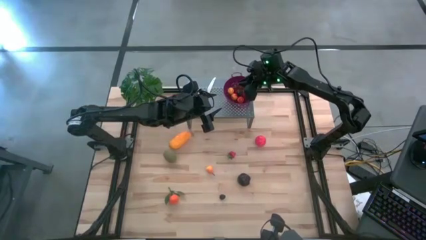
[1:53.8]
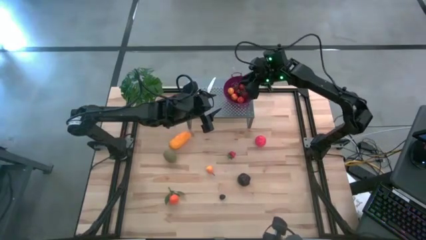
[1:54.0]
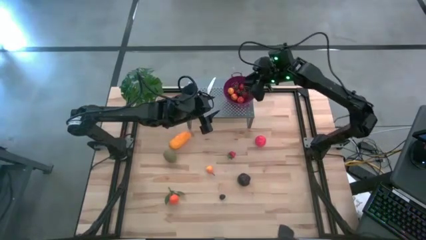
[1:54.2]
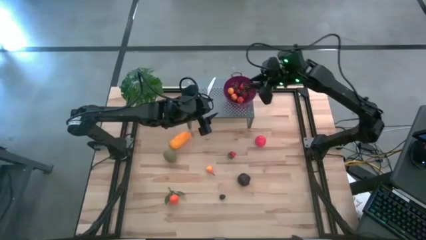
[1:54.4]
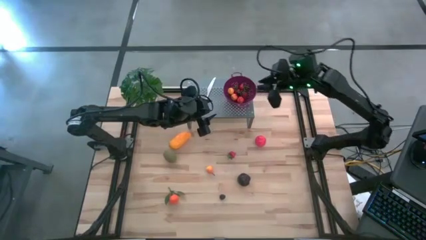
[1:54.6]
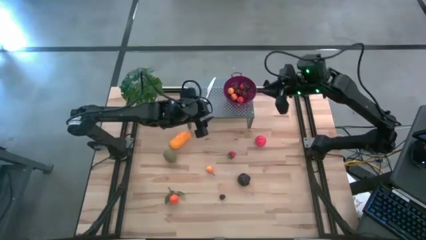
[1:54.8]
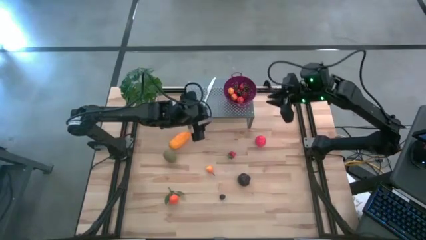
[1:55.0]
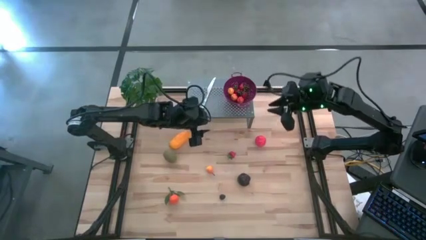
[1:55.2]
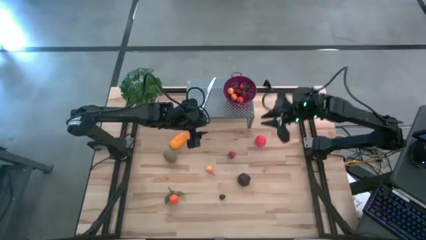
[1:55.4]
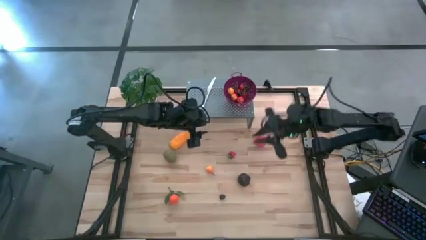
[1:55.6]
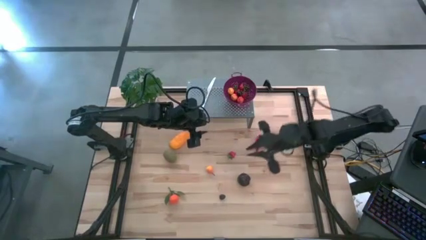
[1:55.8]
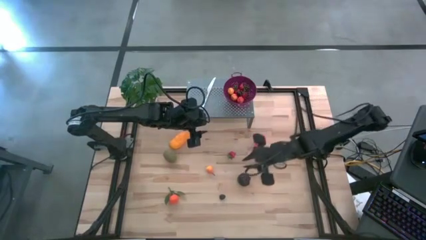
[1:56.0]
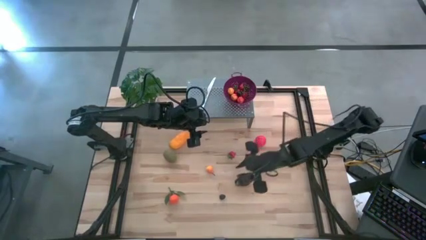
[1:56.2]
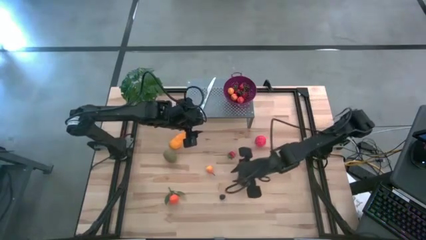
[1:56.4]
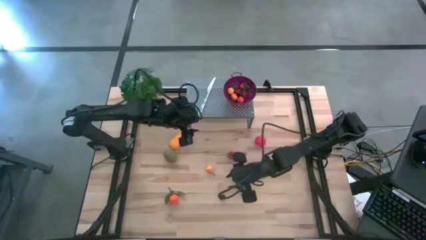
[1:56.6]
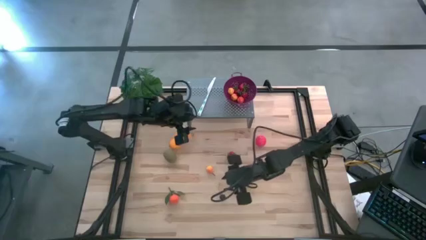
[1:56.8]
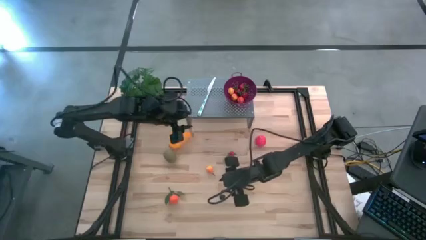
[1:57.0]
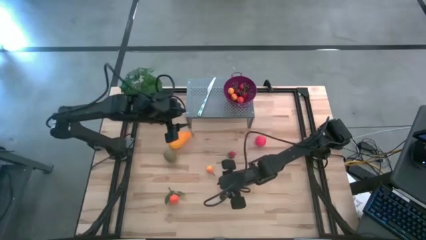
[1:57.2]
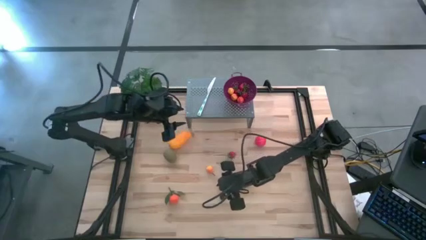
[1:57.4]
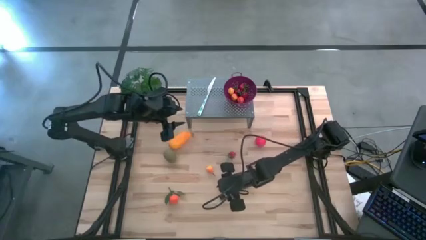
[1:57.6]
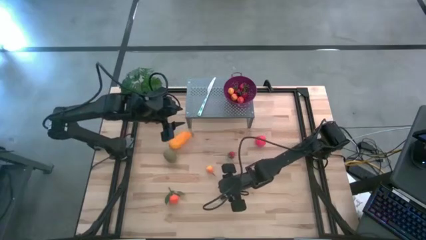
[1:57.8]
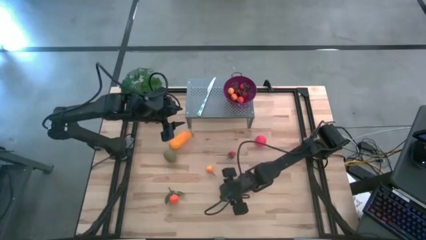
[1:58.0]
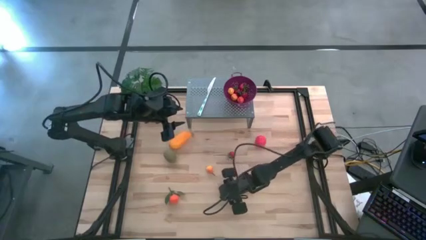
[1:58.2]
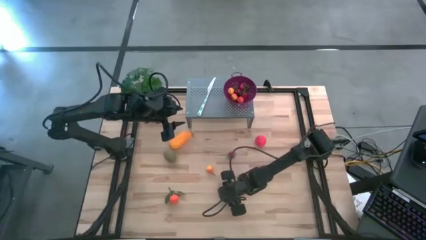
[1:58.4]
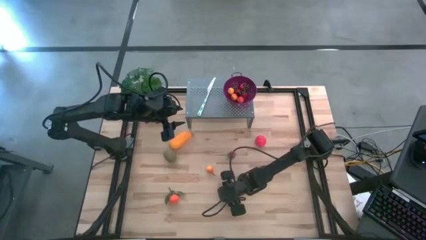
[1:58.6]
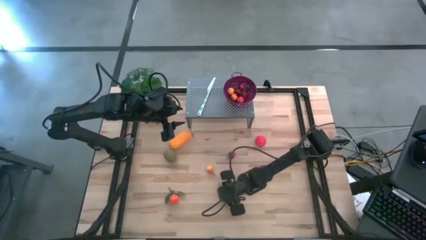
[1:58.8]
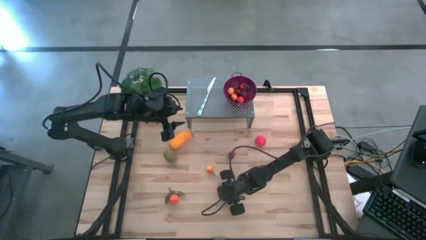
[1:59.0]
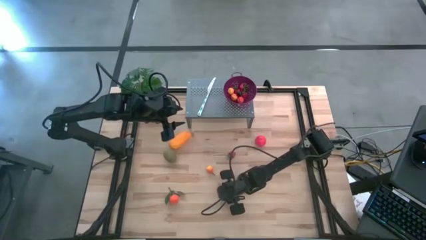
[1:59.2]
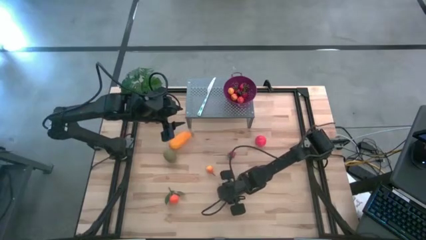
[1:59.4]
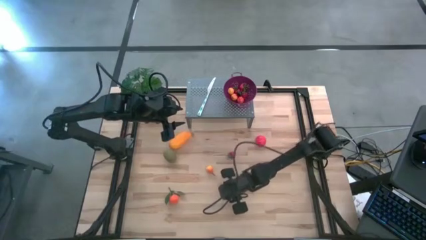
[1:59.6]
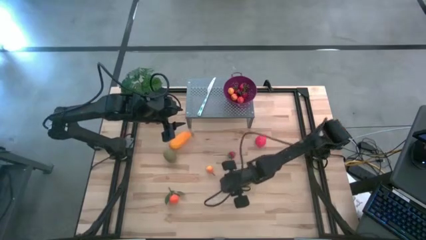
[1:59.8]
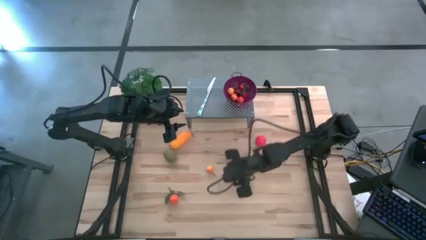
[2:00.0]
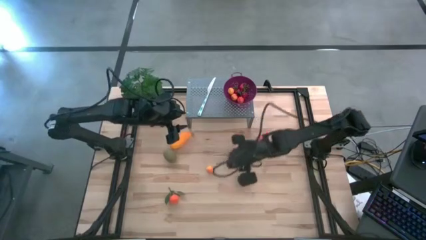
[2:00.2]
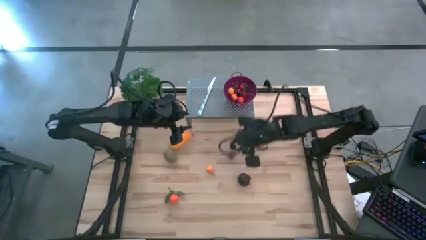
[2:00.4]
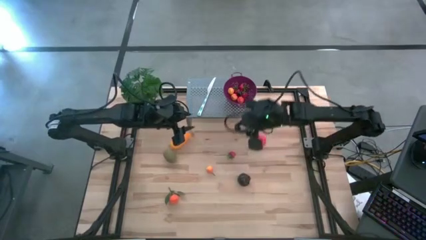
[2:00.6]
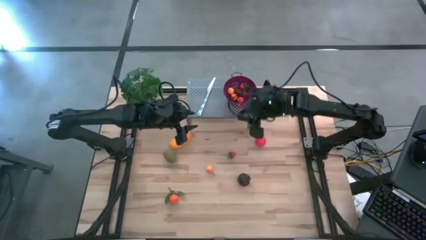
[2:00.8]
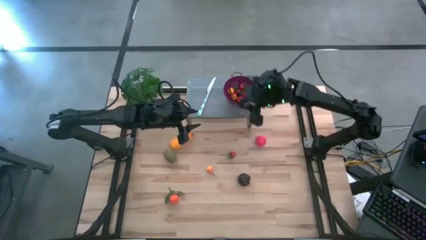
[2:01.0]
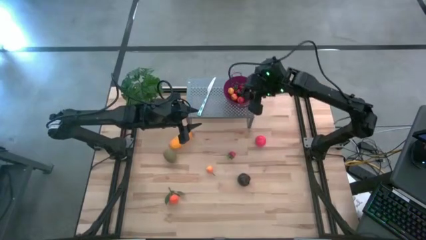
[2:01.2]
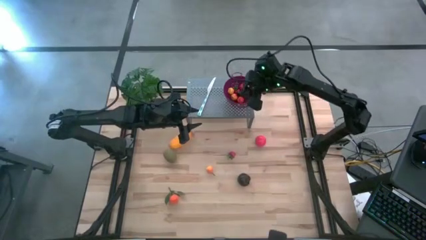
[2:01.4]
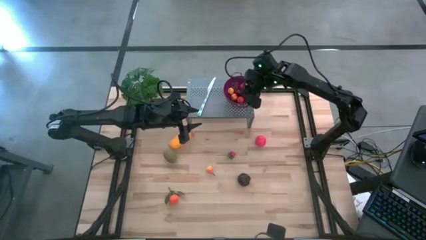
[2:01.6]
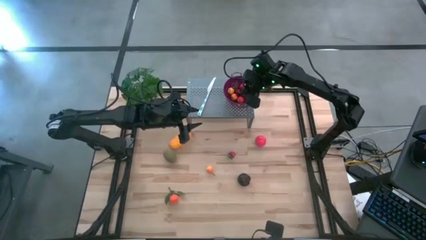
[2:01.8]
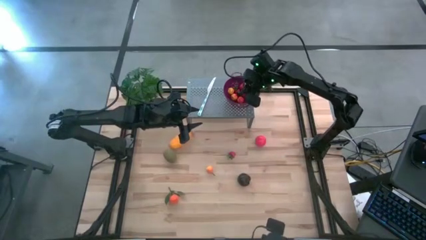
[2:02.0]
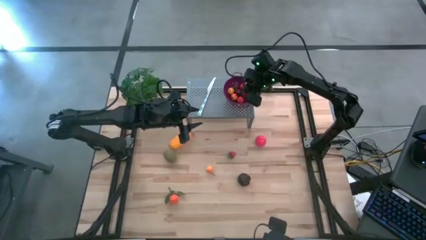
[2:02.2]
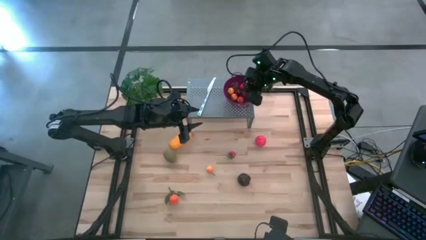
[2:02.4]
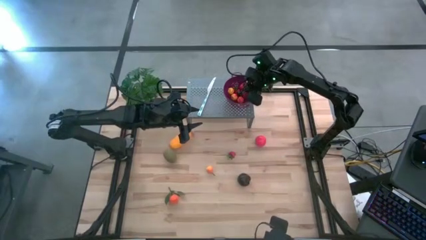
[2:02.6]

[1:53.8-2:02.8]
Task: Pick & Place Fruit
Put the blackberry into the violet strainer bowl on the shelf

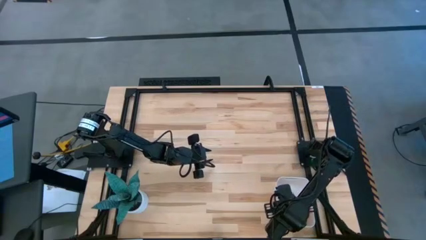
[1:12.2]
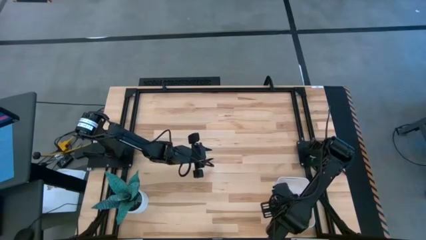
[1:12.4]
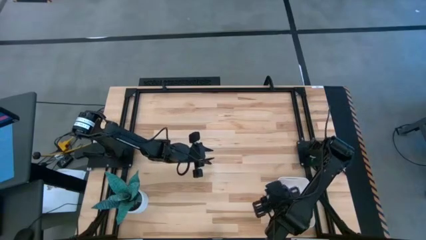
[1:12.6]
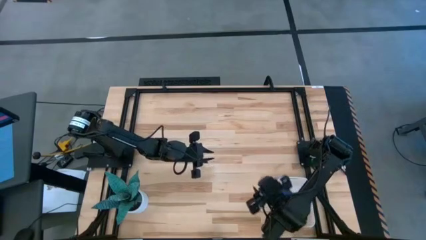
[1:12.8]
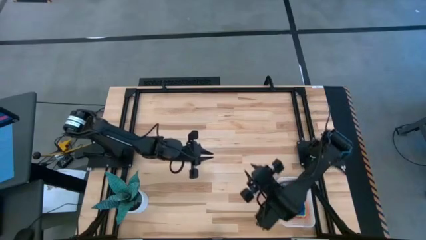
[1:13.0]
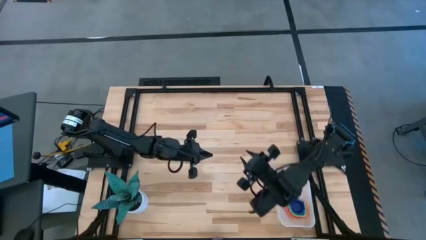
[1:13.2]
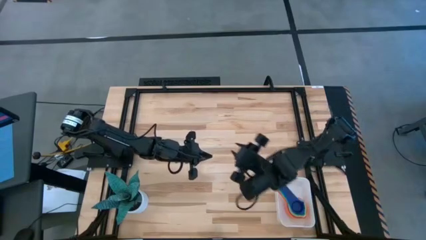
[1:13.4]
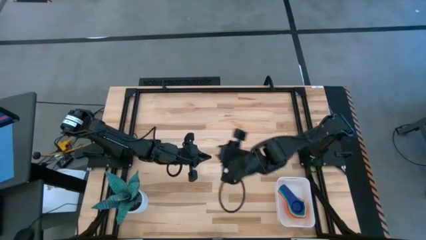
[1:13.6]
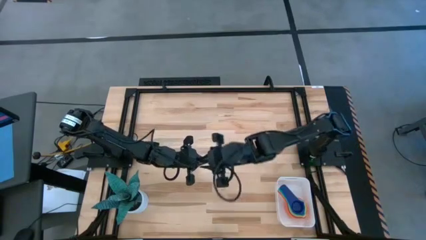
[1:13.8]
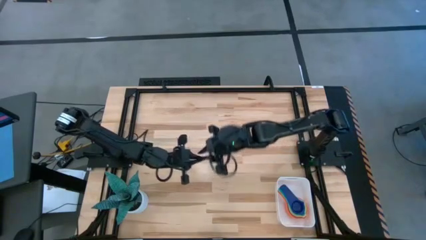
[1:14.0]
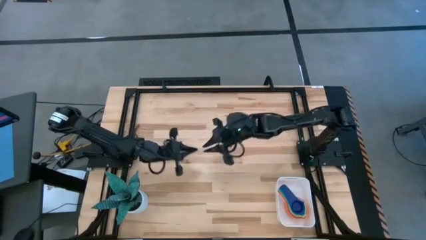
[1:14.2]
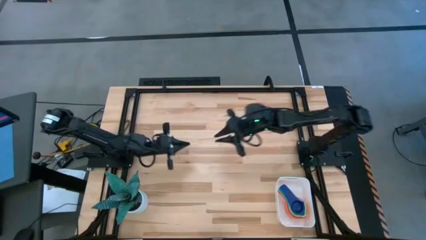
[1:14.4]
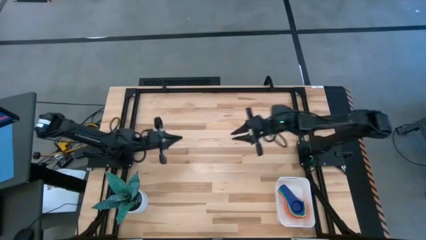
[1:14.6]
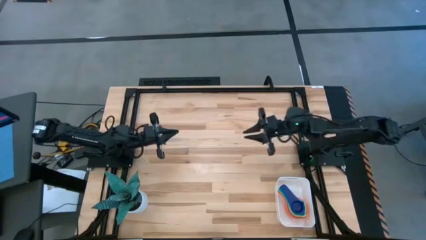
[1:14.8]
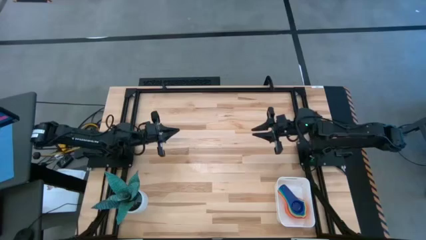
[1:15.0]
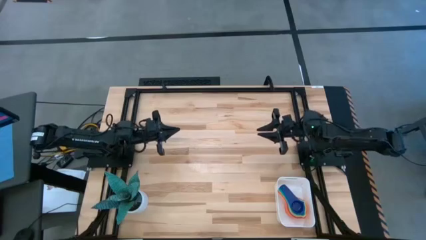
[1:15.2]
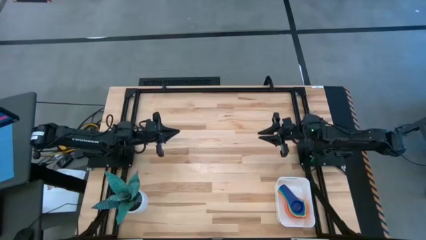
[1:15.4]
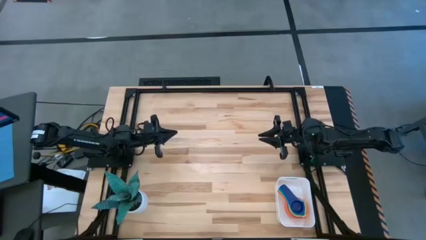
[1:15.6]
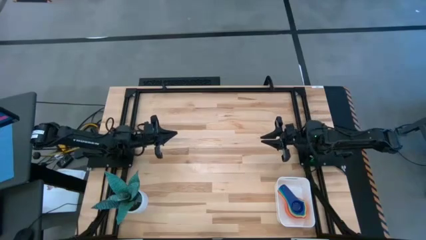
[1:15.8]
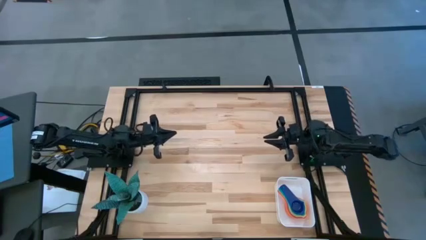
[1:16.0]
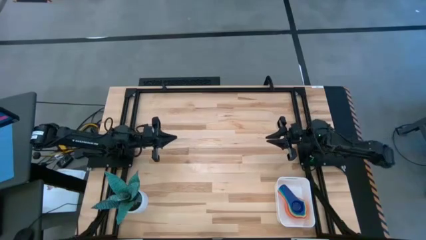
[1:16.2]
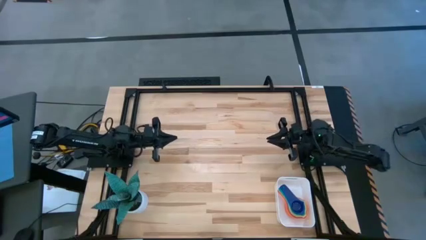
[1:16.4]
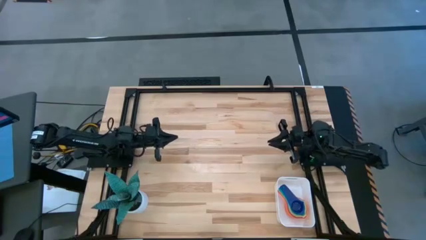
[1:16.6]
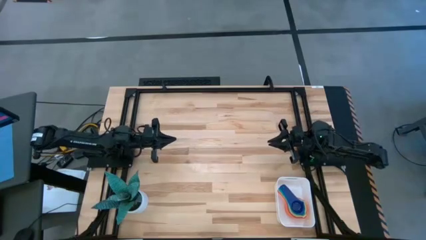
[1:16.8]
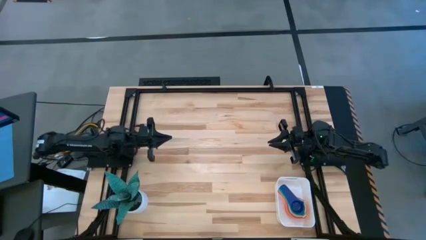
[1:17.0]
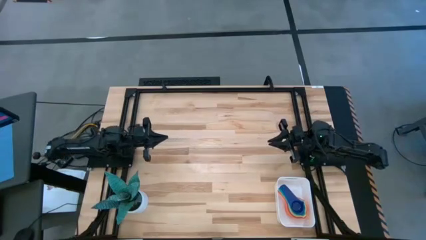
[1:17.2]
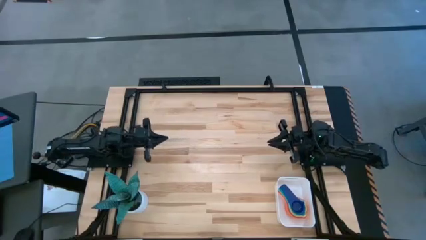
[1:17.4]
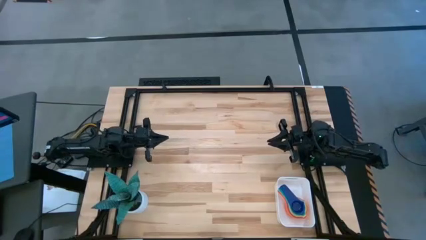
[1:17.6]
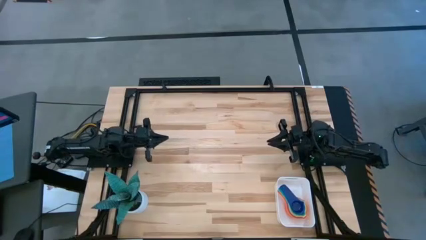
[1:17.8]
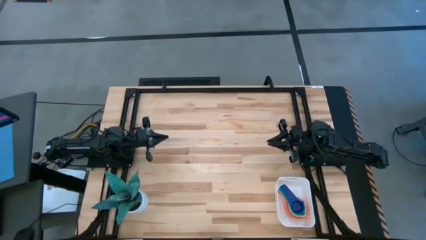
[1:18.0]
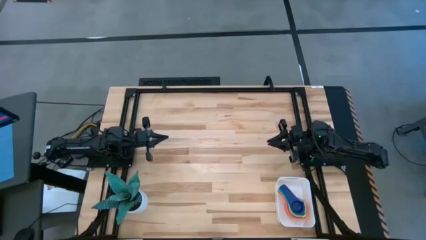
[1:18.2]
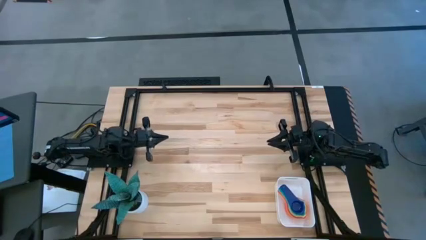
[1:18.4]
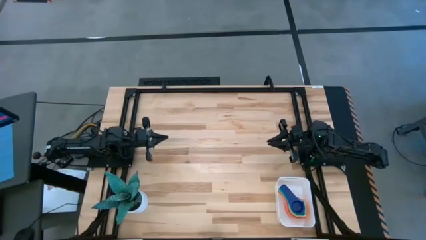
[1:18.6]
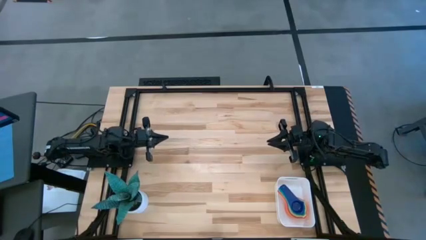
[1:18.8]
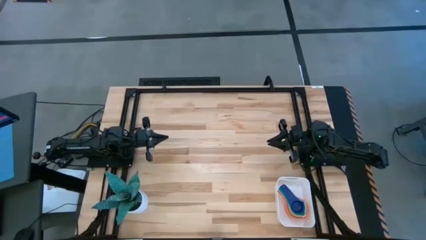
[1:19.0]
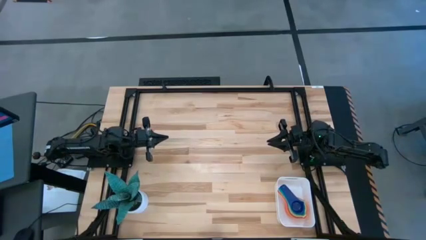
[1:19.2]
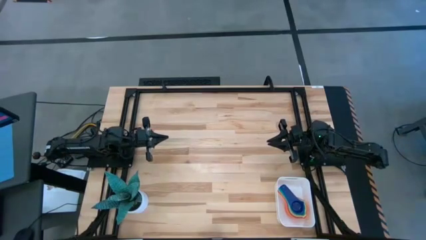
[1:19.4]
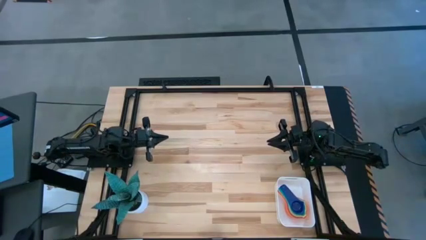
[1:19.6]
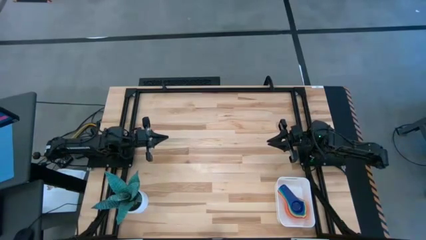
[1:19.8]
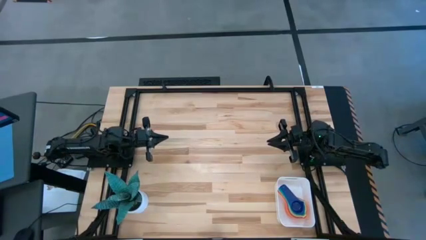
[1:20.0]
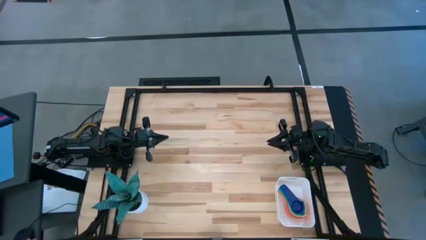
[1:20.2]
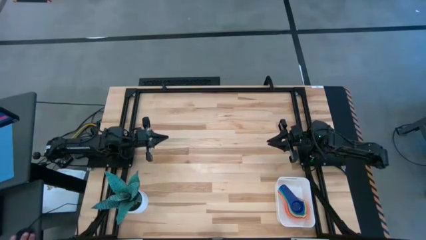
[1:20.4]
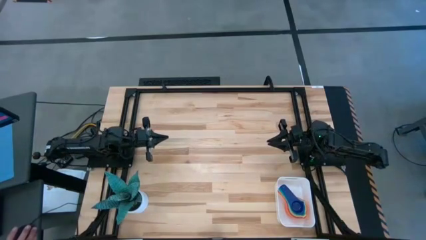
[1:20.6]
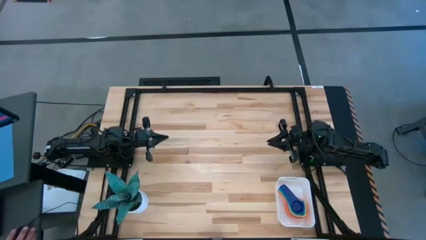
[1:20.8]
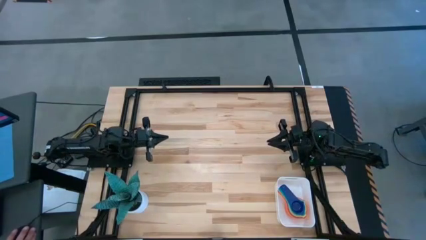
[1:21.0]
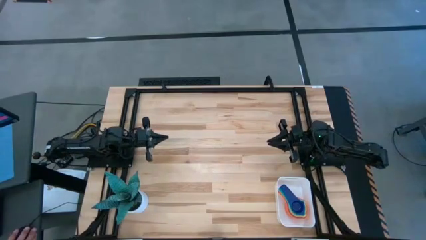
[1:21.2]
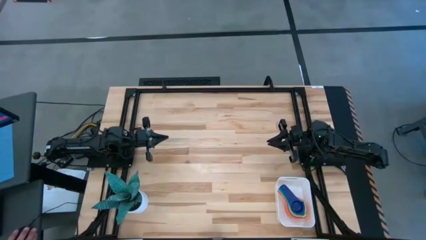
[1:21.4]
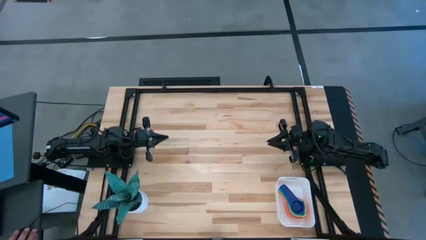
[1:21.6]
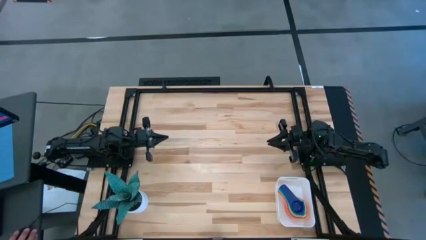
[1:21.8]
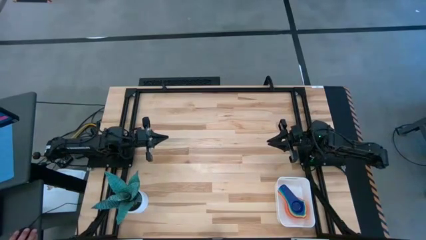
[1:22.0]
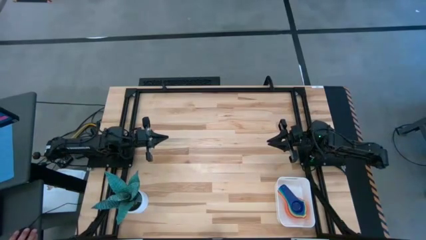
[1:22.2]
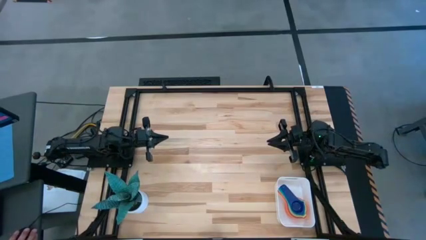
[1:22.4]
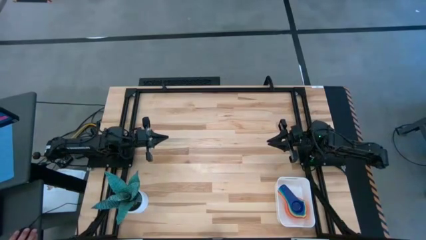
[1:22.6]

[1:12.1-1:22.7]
Task: Nest measuring cups in basket
Return to Home Position
